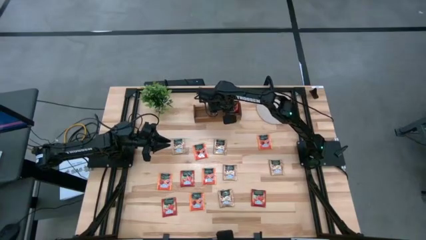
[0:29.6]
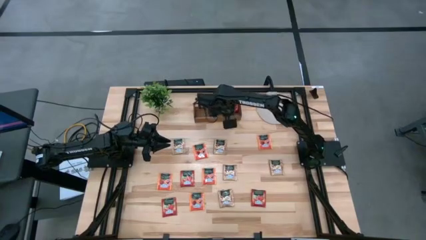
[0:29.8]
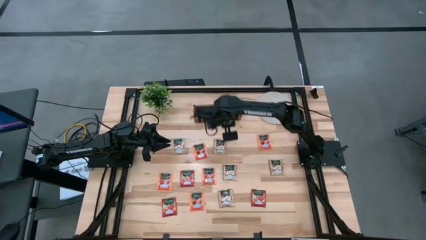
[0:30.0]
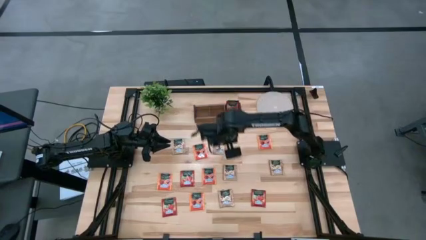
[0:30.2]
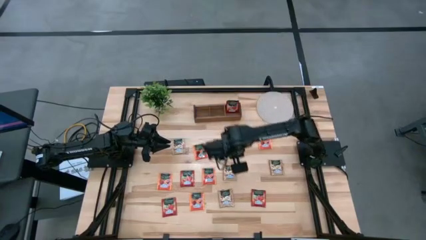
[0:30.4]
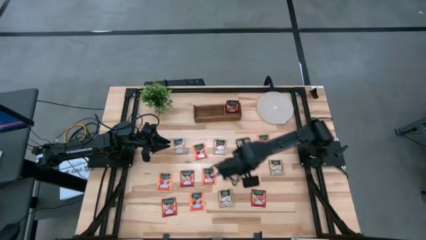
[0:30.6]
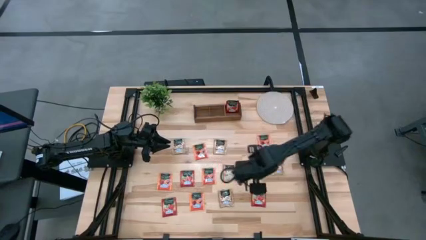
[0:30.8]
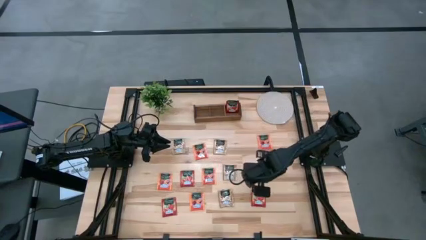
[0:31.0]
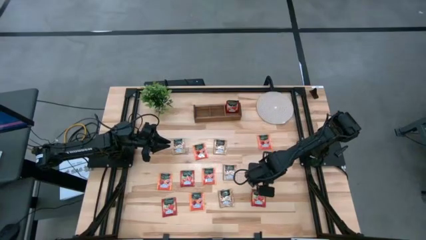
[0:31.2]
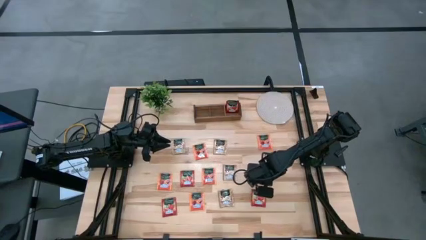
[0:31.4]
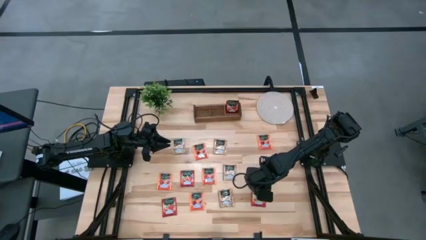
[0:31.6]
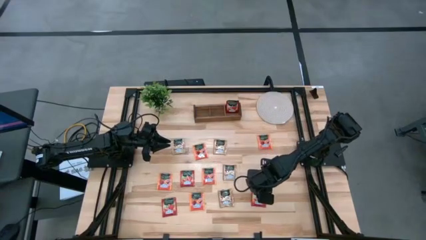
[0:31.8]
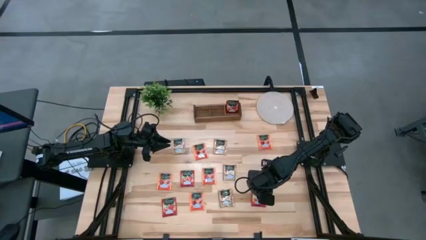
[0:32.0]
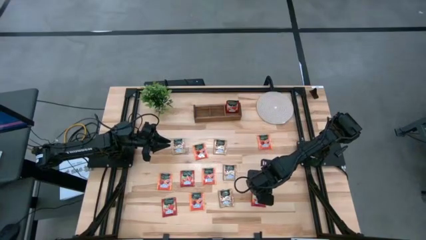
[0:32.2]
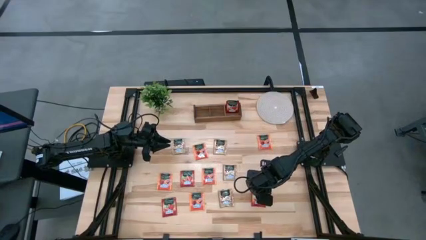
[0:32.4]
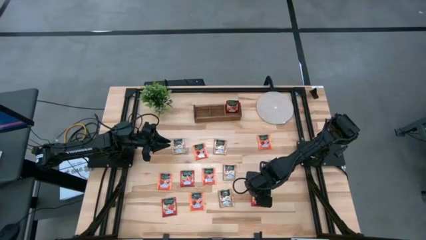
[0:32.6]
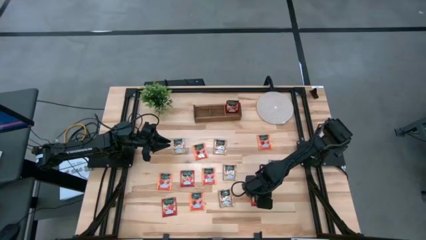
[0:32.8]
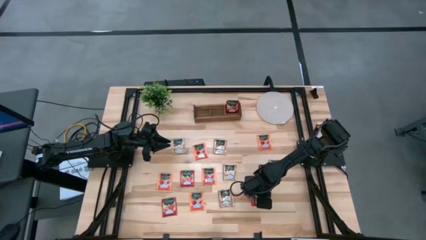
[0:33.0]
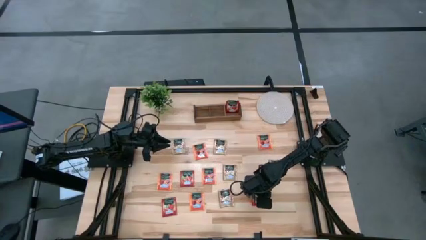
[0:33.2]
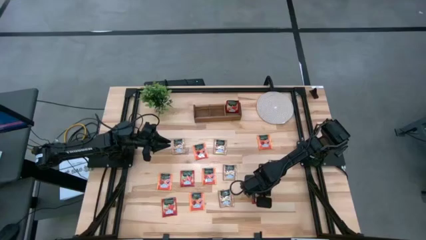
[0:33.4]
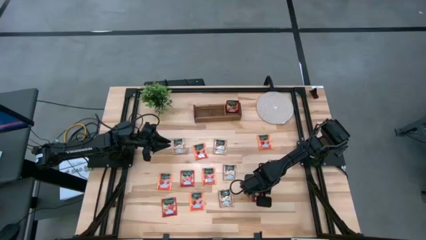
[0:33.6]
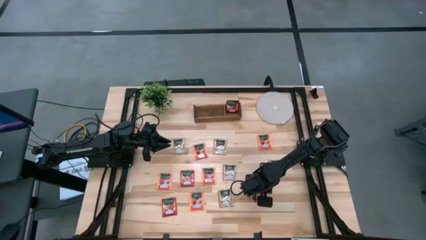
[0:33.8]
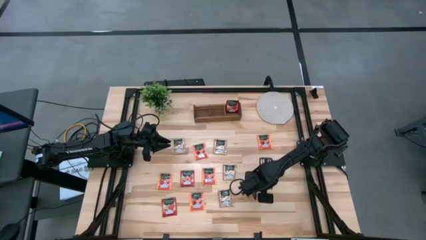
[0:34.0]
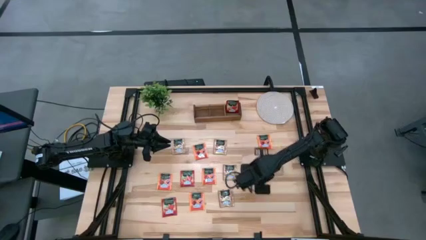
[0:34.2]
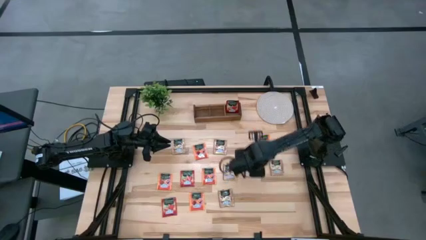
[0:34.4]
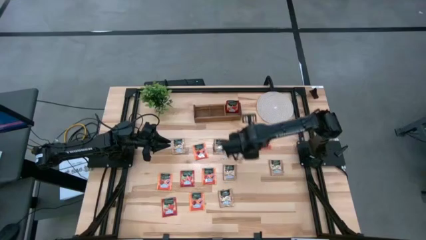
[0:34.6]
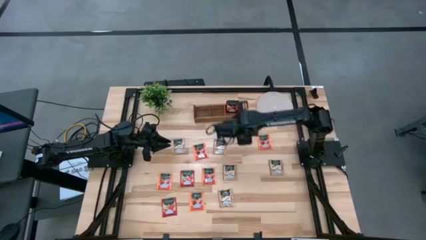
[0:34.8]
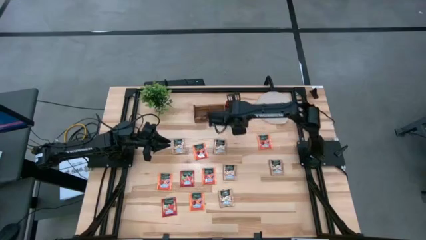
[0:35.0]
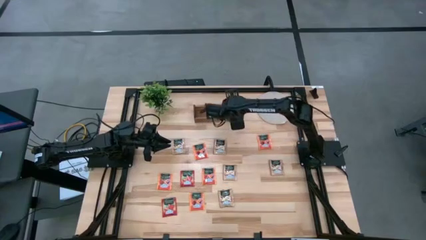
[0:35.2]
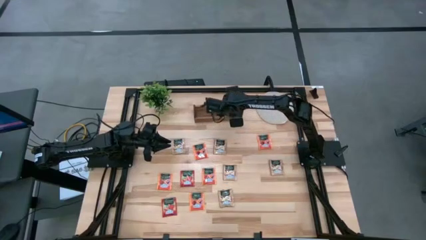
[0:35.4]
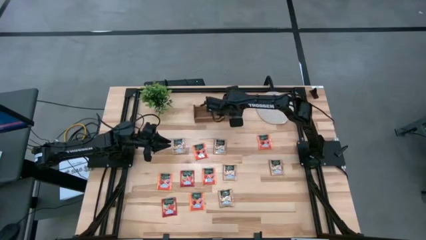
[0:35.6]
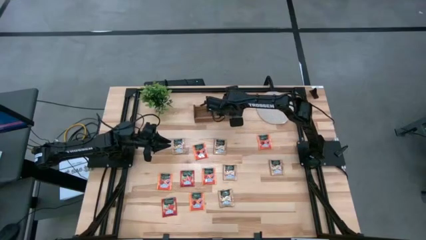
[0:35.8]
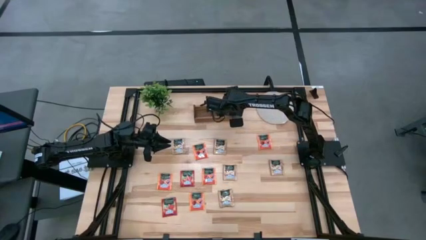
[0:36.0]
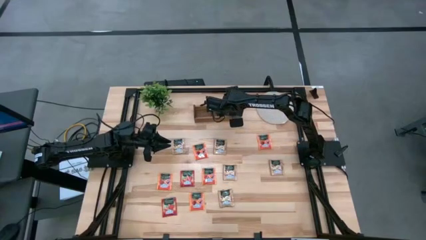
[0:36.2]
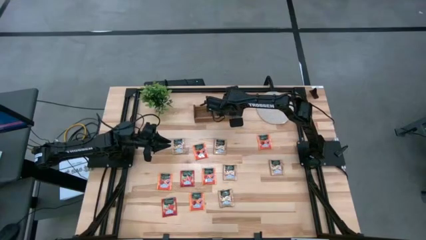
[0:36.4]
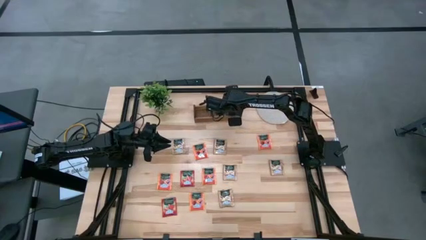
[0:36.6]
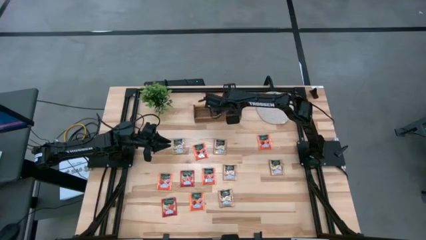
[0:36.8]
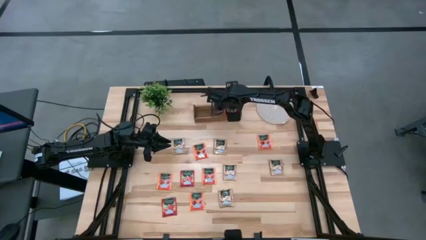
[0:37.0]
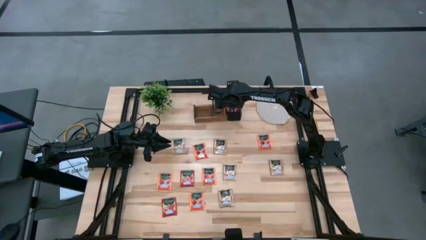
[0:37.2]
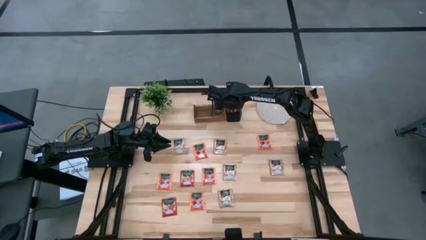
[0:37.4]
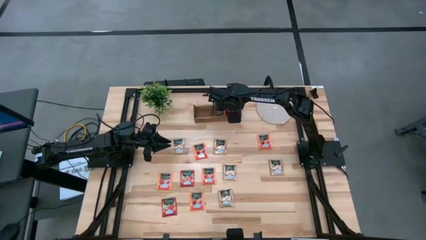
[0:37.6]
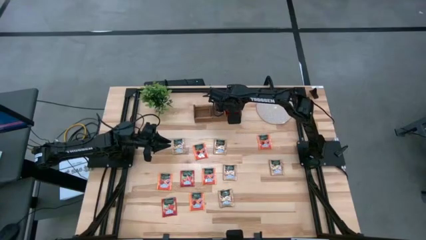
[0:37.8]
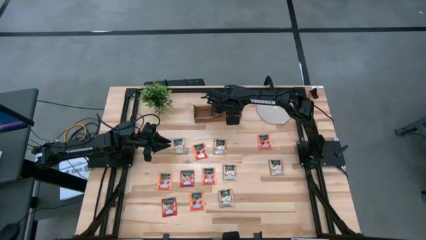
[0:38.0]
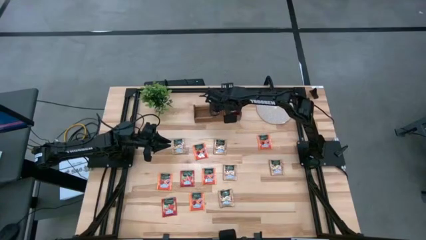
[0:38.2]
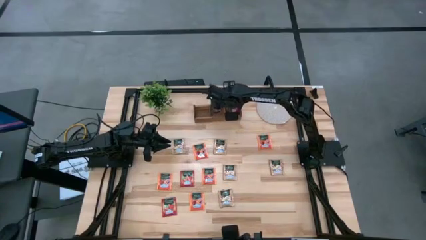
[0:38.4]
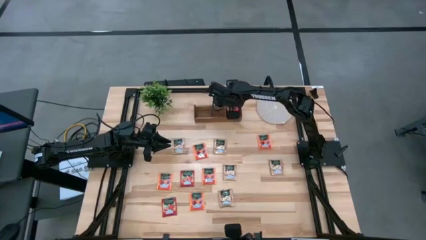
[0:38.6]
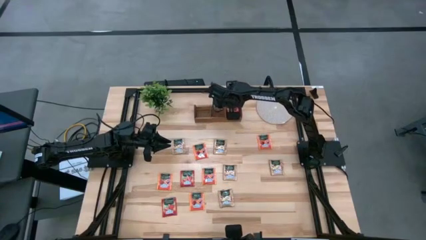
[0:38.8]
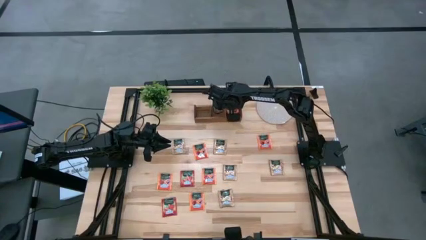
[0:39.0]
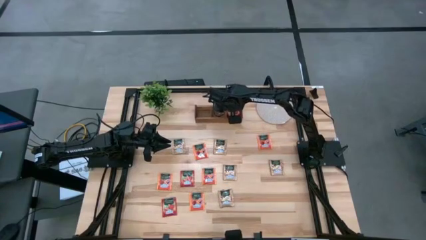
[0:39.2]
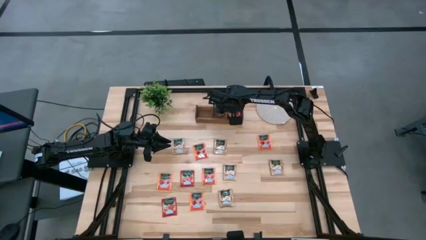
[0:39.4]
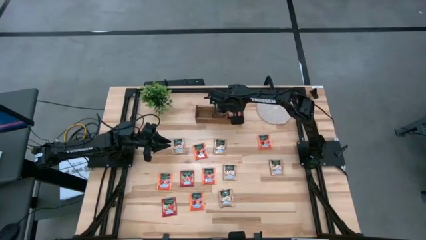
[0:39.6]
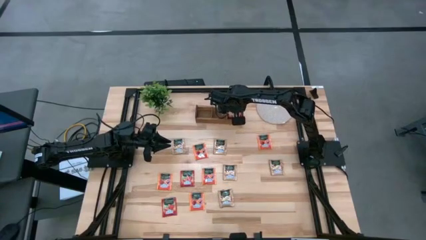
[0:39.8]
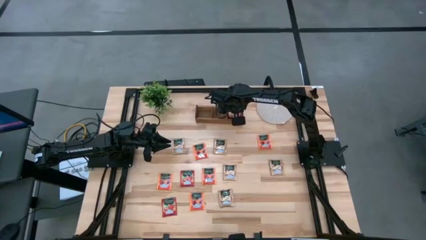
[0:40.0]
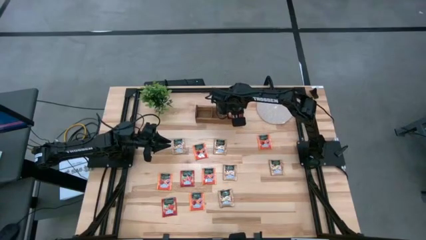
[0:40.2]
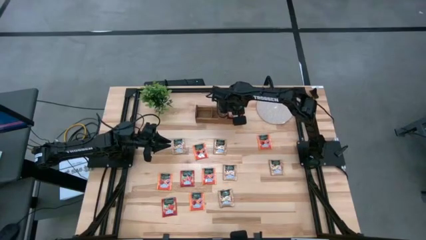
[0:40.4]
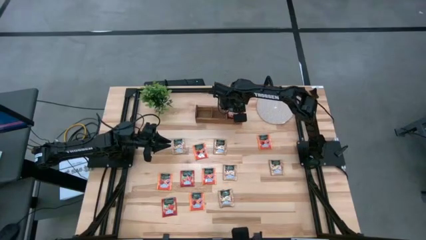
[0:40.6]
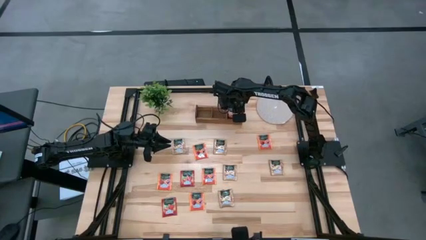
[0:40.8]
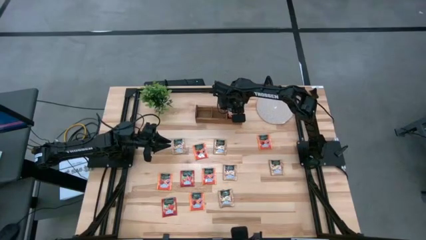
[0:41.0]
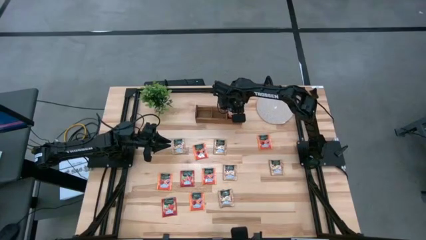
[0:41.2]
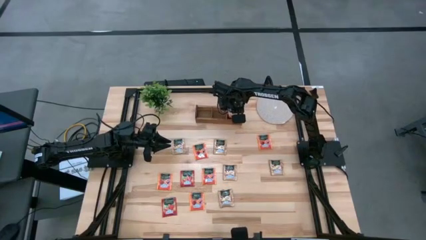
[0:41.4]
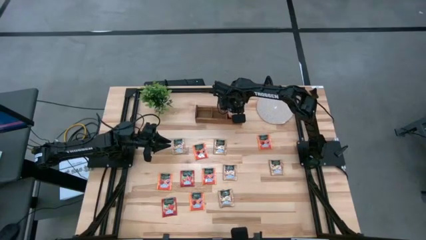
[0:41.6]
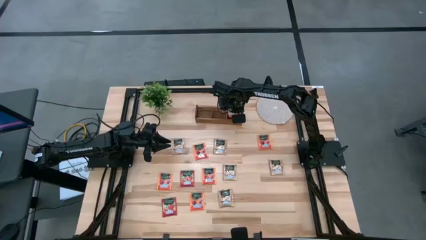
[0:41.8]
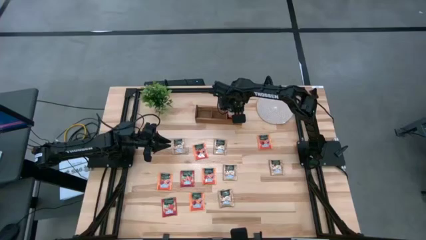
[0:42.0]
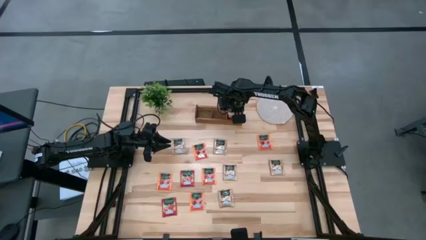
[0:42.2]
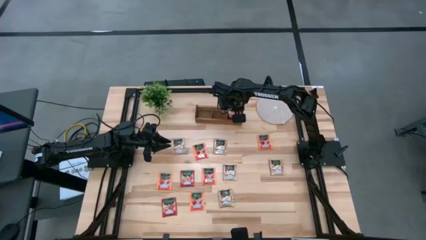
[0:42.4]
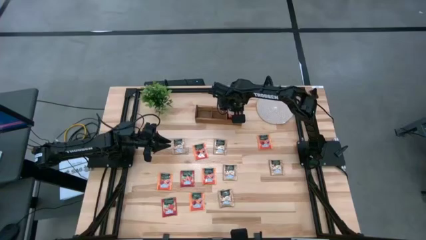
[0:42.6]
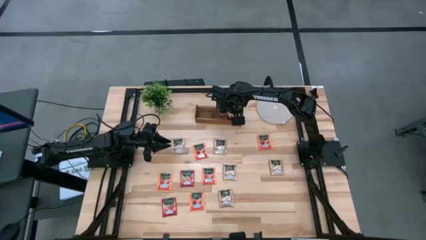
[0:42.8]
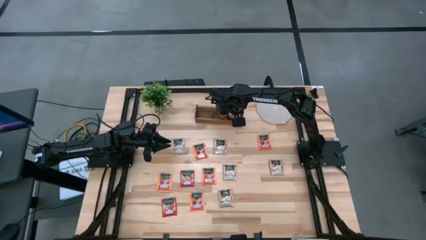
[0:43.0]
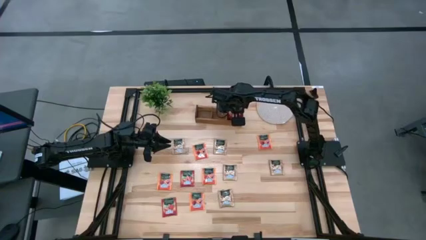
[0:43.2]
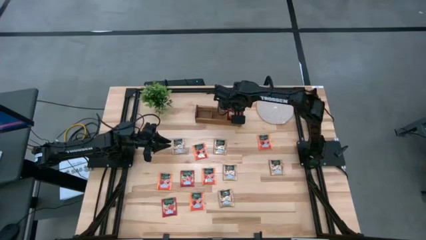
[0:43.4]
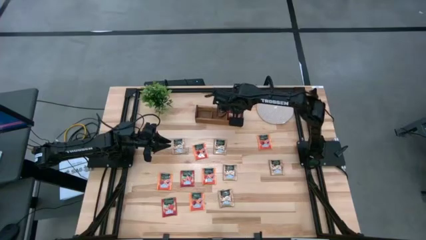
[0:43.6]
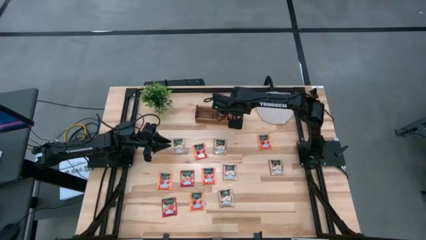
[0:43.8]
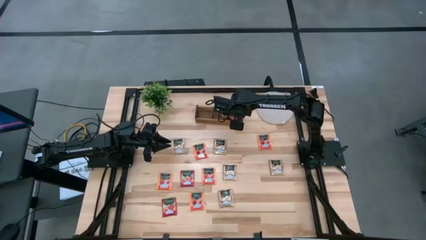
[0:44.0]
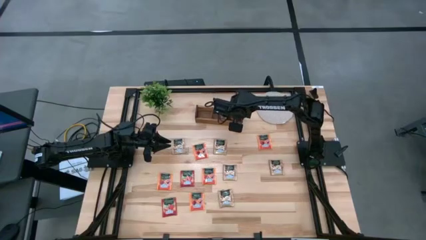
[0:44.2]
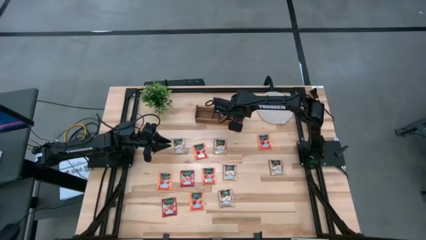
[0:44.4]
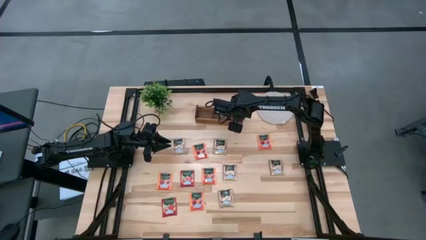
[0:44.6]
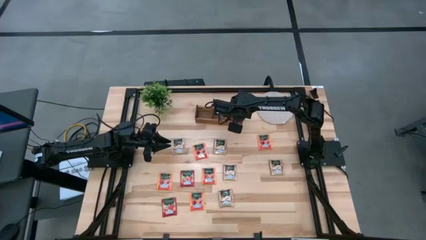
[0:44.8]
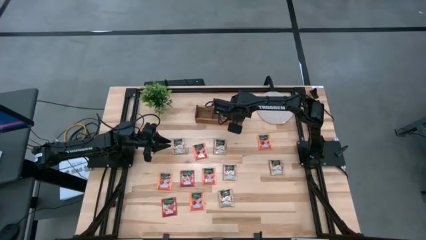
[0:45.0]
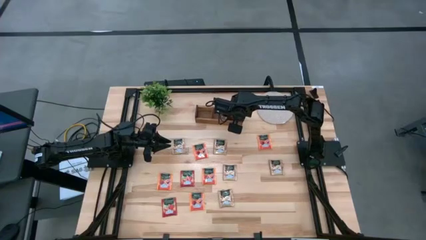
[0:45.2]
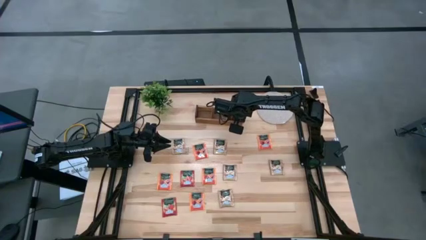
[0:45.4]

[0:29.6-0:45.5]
Task: Pick & Place Tea
Put the red tea bag into the right section of the wooden organizer
